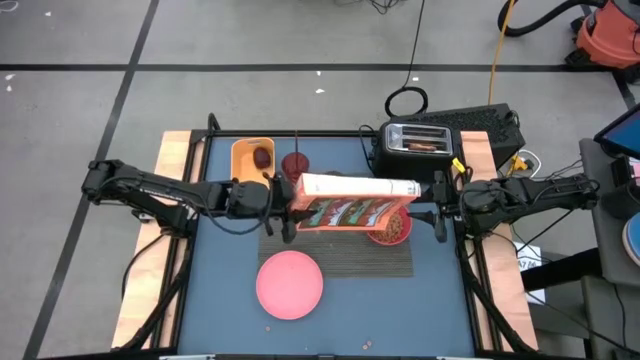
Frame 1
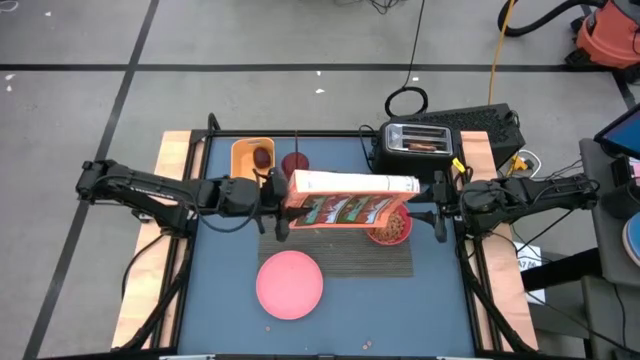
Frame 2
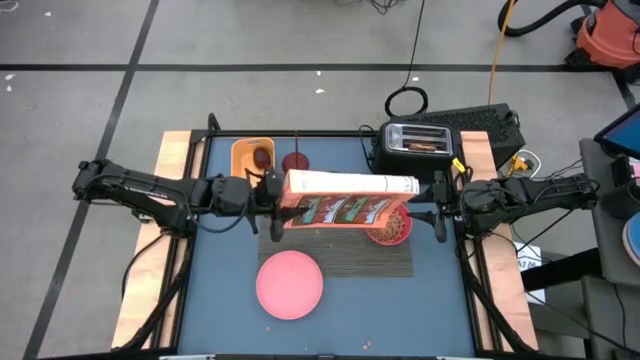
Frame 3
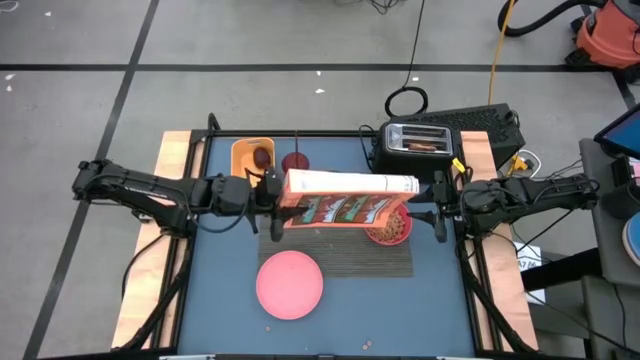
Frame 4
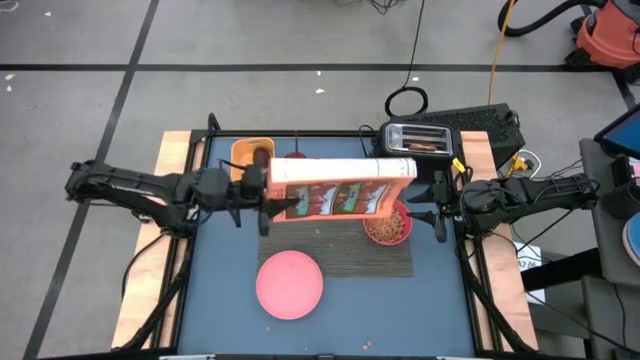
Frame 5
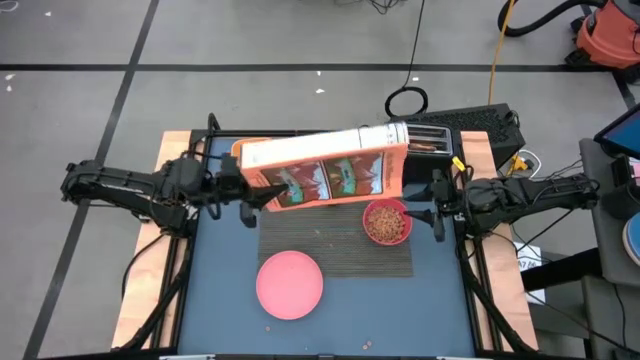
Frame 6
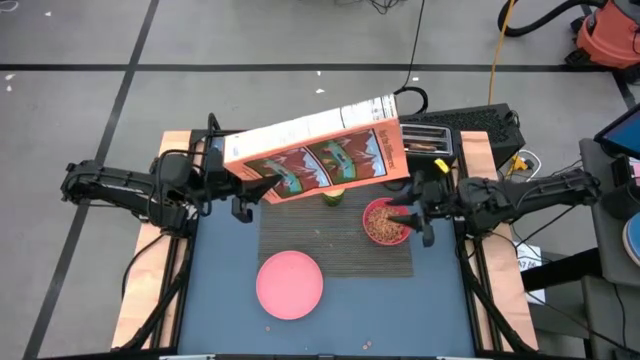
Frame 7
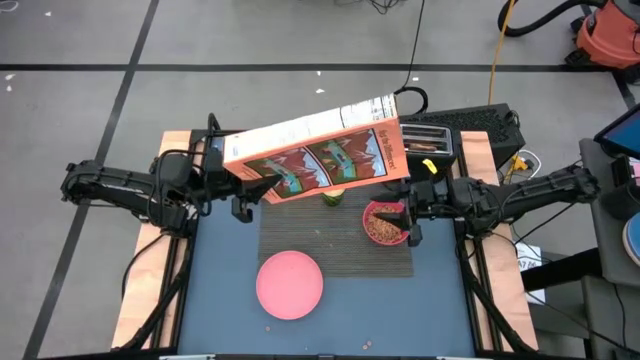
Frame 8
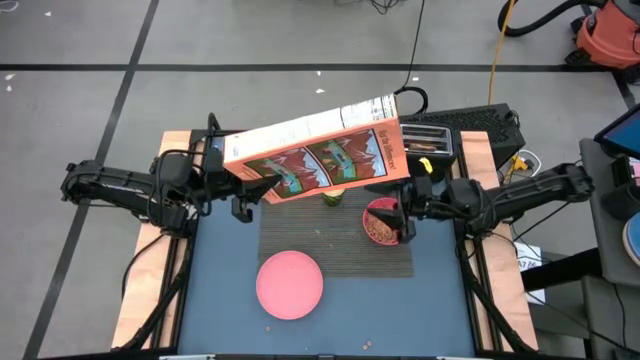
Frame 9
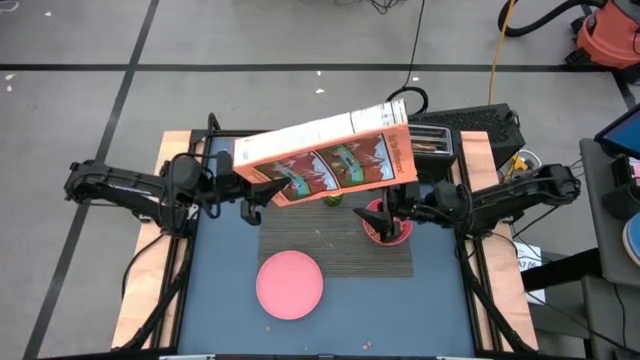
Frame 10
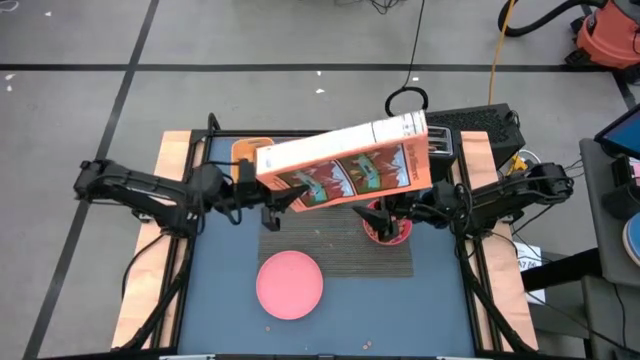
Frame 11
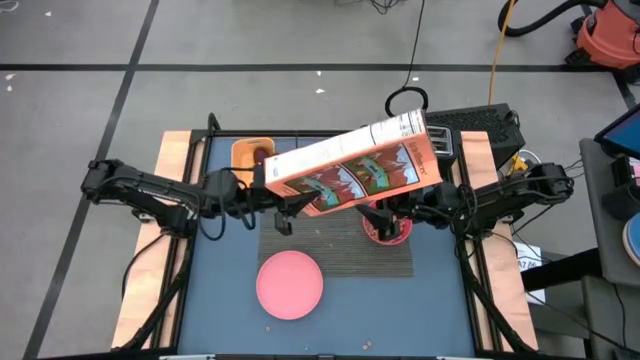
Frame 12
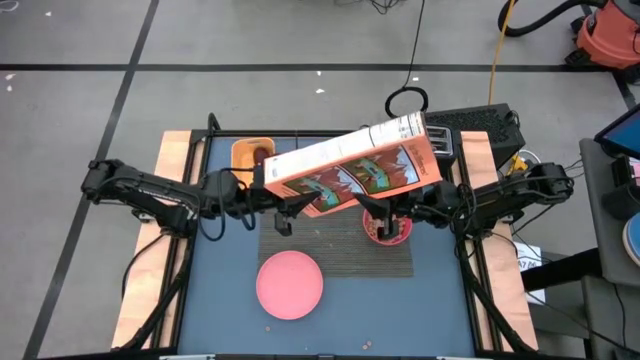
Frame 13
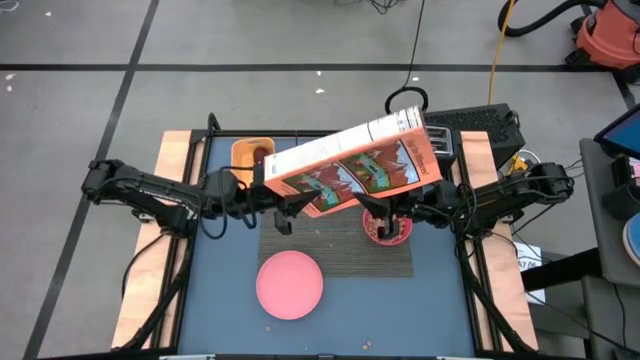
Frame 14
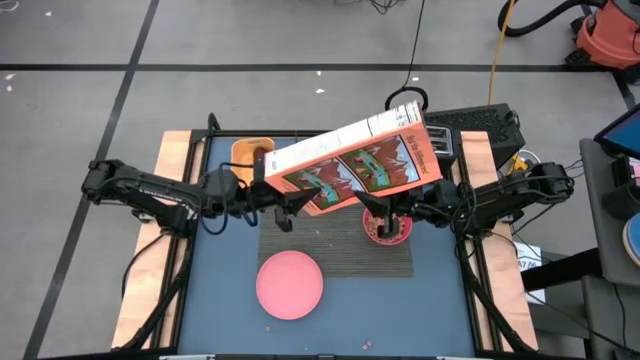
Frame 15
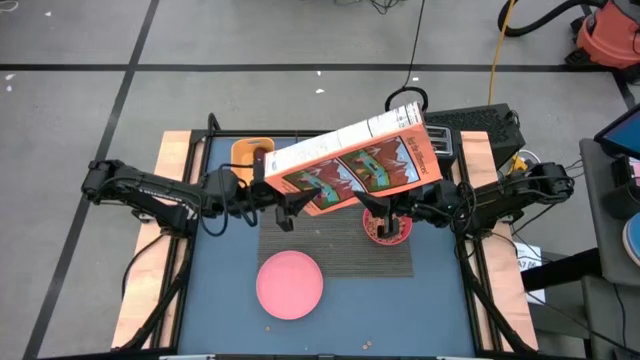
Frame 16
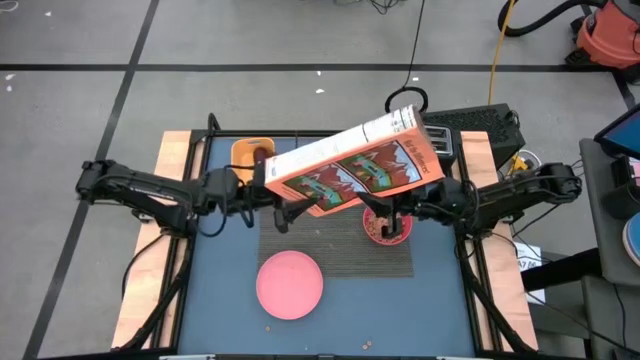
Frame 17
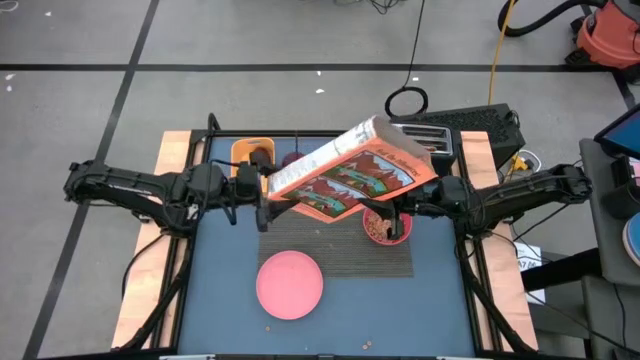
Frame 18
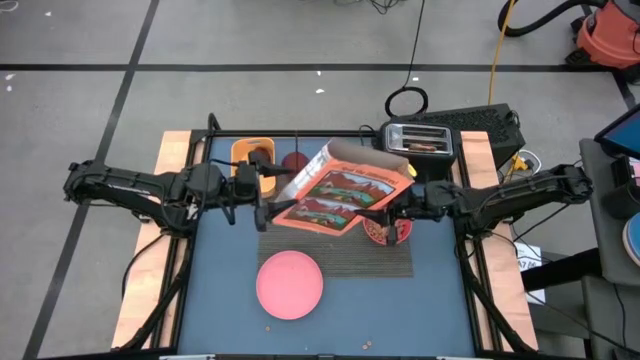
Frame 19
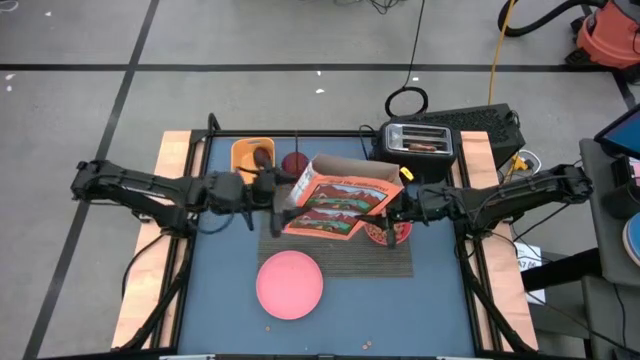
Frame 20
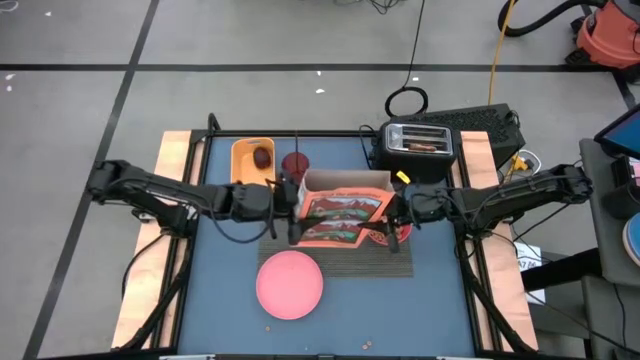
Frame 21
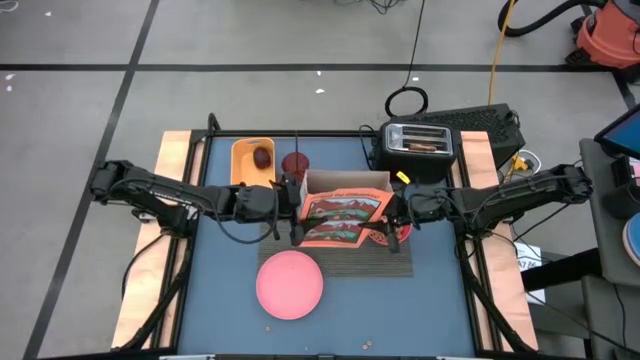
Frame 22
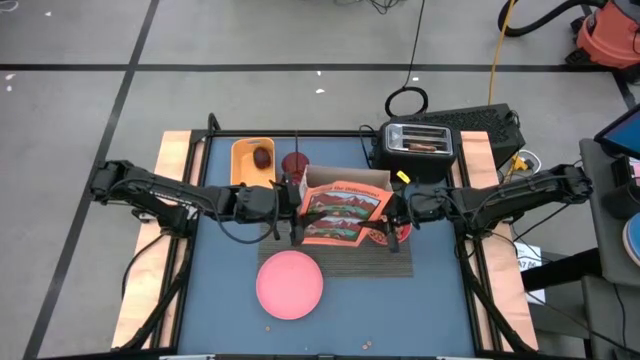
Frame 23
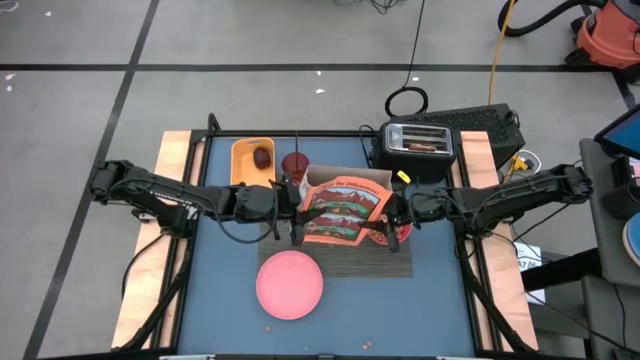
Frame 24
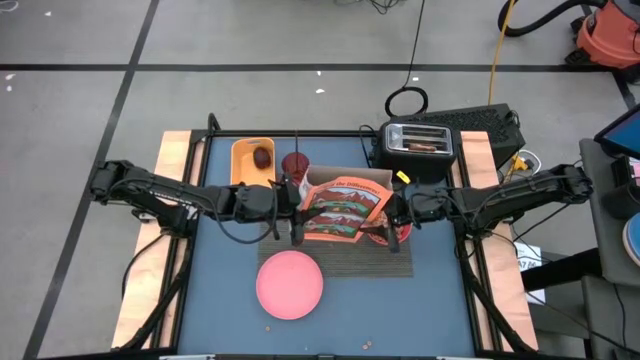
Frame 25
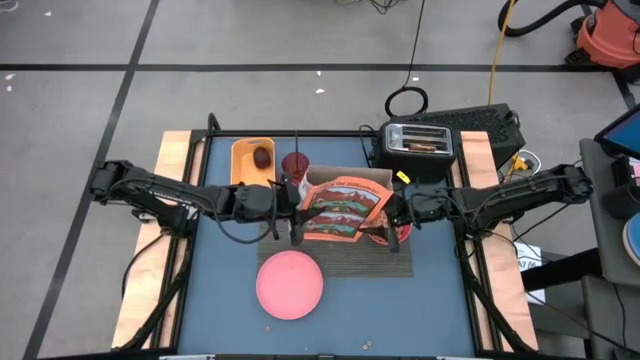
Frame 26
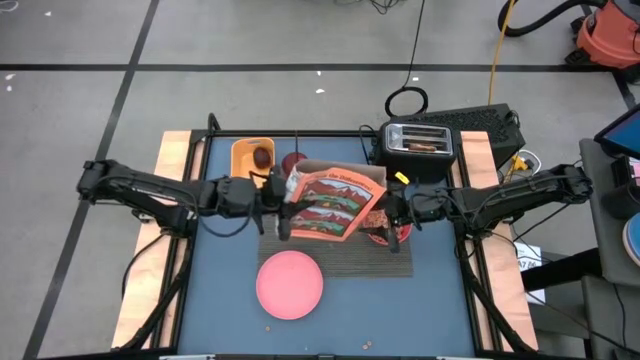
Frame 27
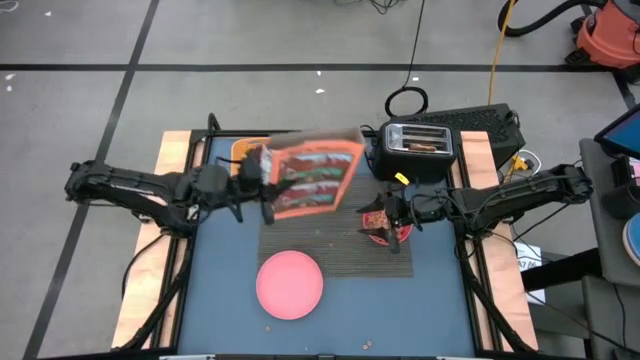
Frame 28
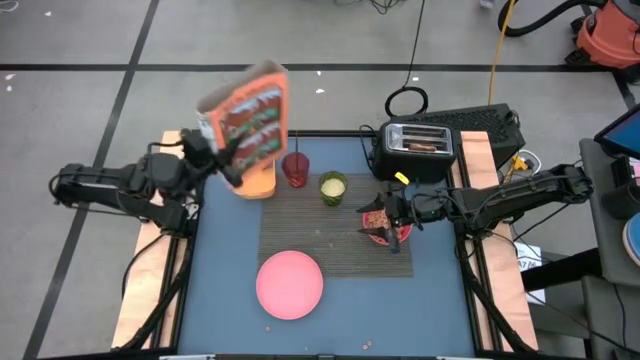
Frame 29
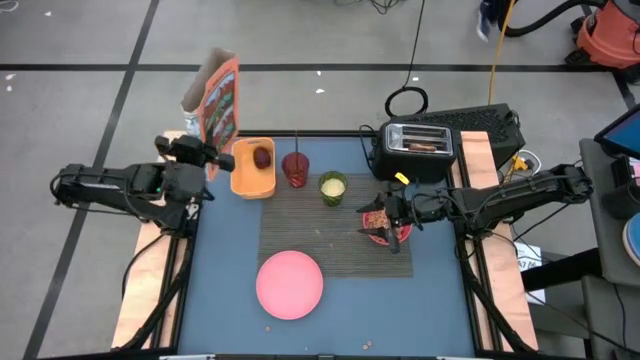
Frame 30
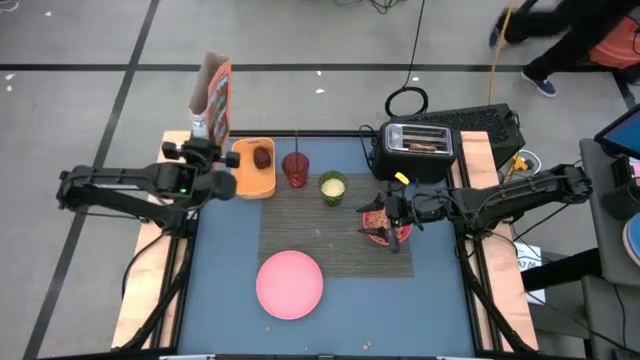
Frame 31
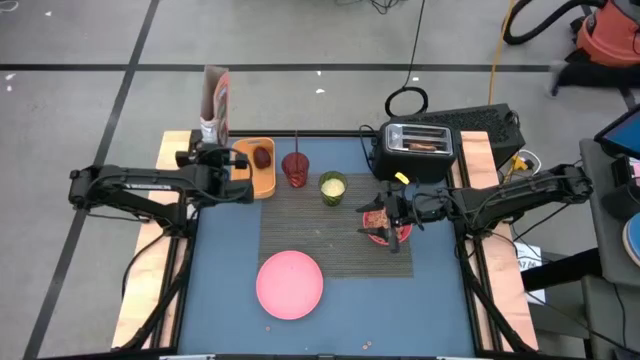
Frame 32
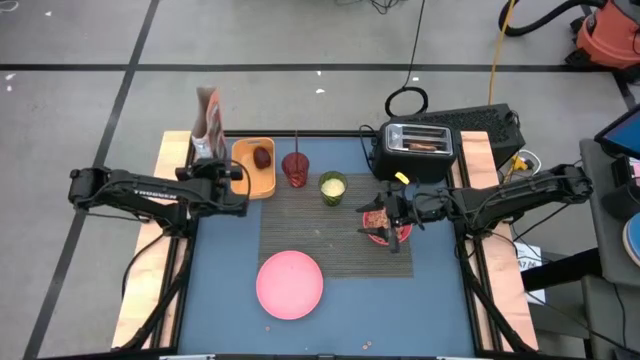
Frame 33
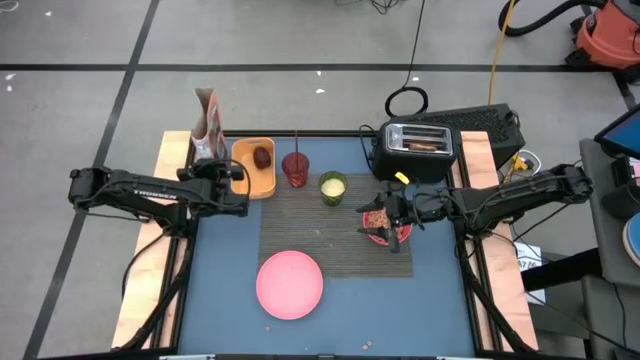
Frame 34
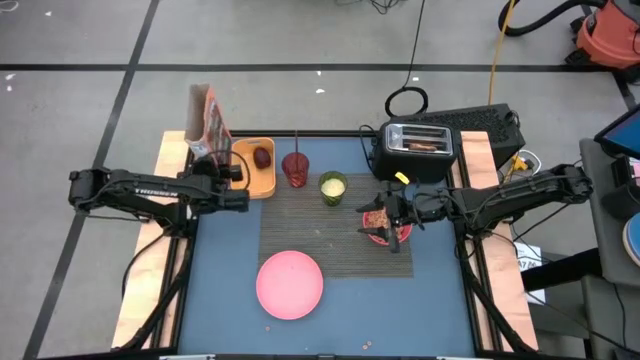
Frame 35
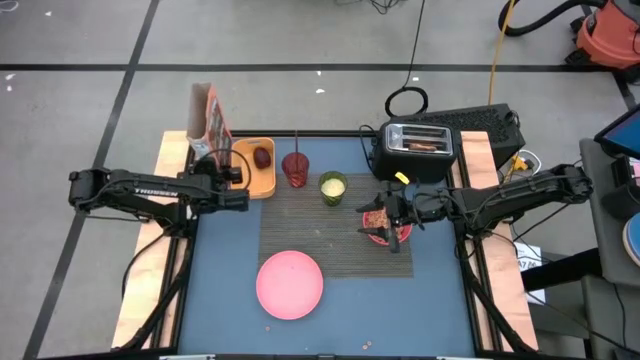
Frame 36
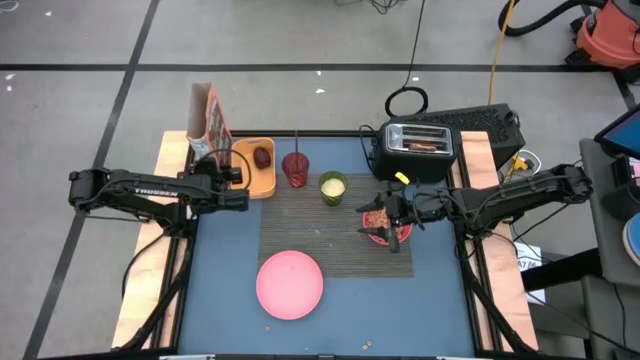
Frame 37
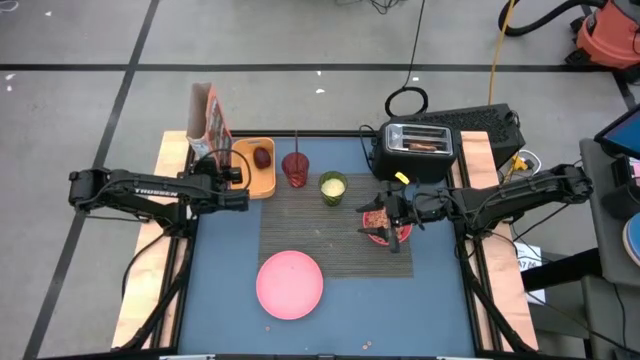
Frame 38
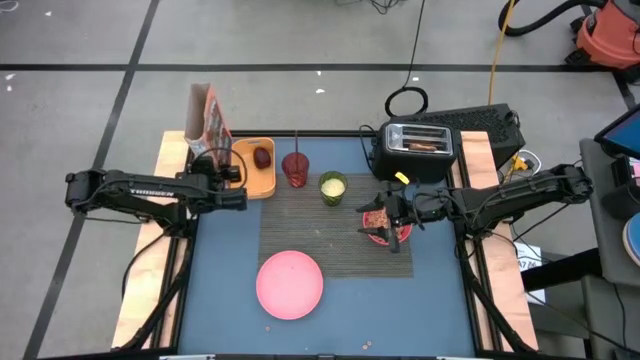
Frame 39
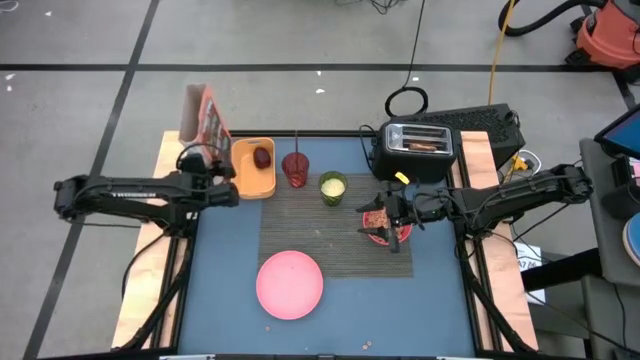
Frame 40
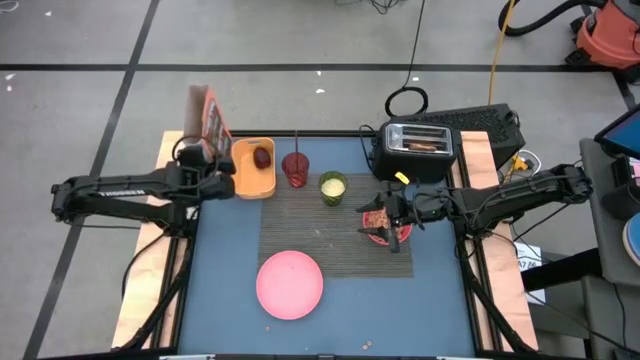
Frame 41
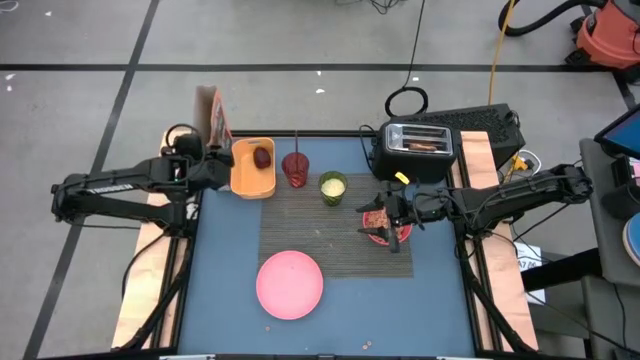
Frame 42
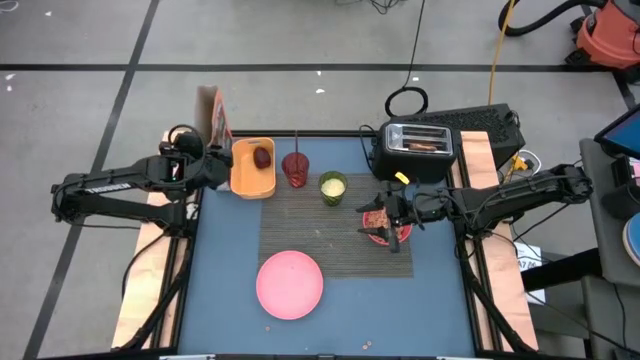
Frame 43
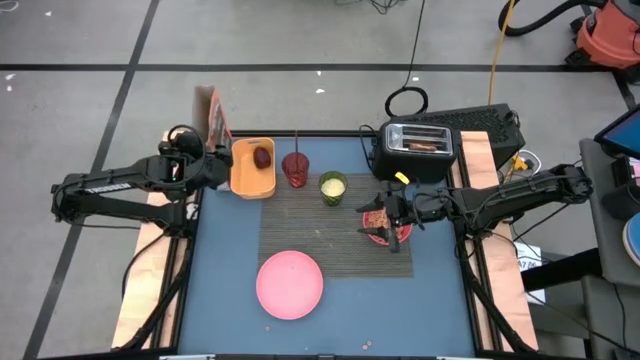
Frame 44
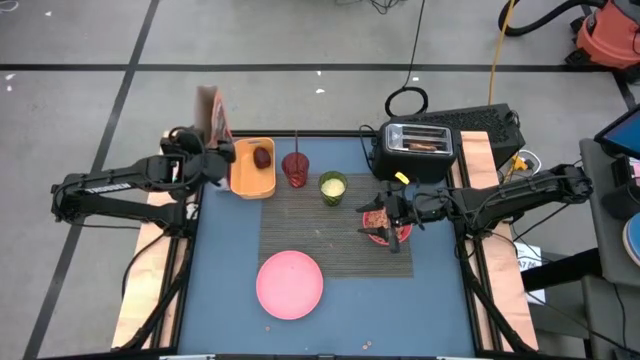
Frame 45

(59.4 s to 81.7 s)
Task: Arrange a breakfast setting
Pour the cereal from the cereal box into the pink bowl
